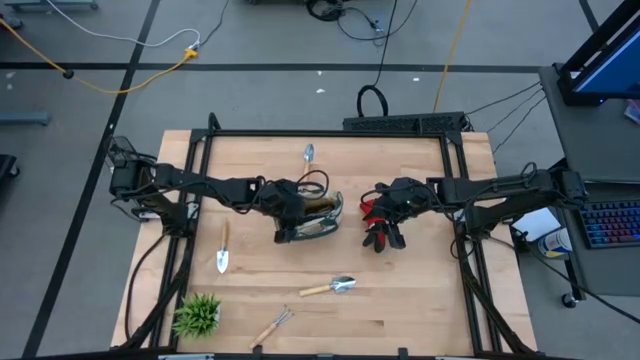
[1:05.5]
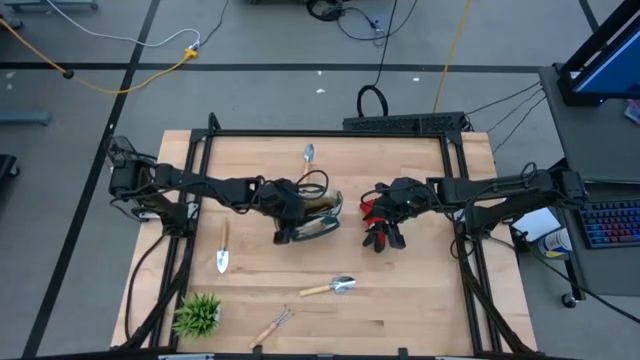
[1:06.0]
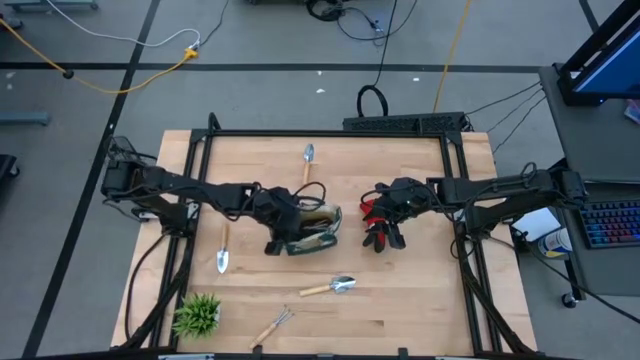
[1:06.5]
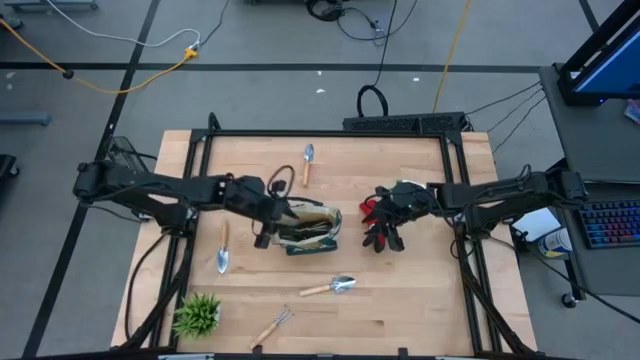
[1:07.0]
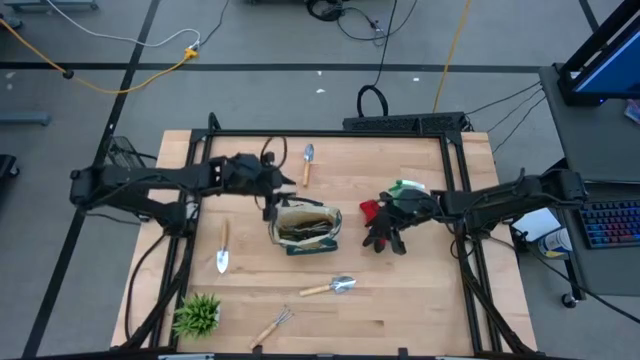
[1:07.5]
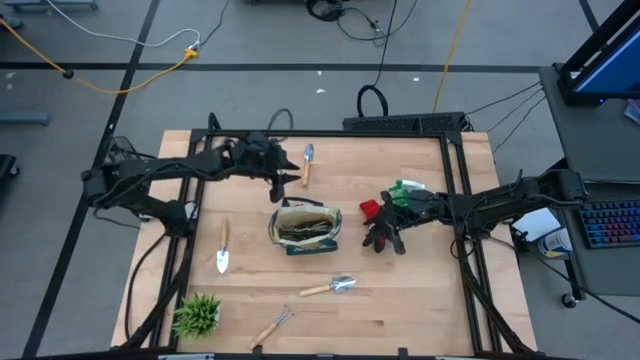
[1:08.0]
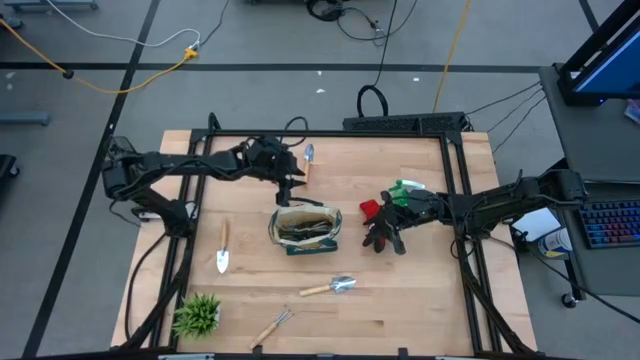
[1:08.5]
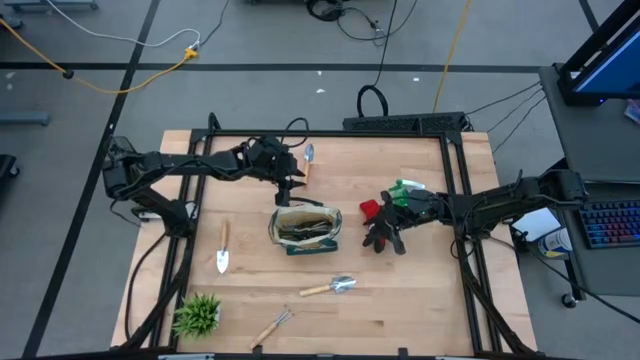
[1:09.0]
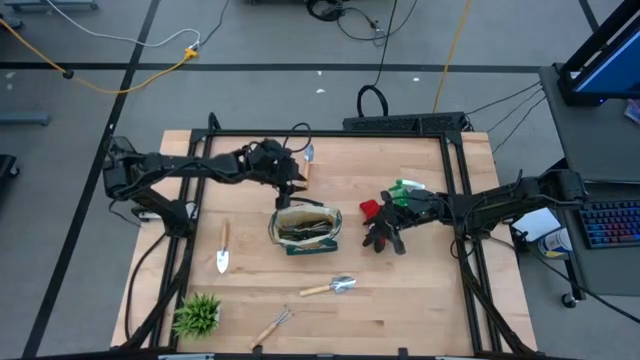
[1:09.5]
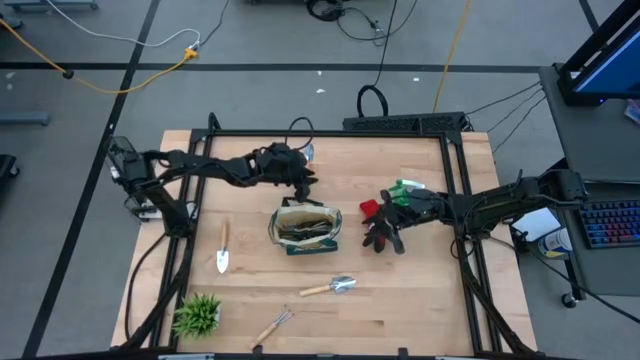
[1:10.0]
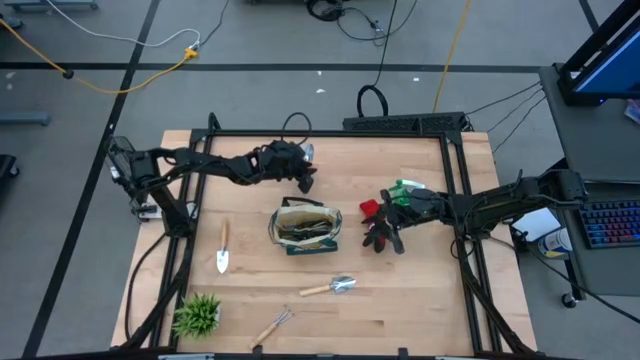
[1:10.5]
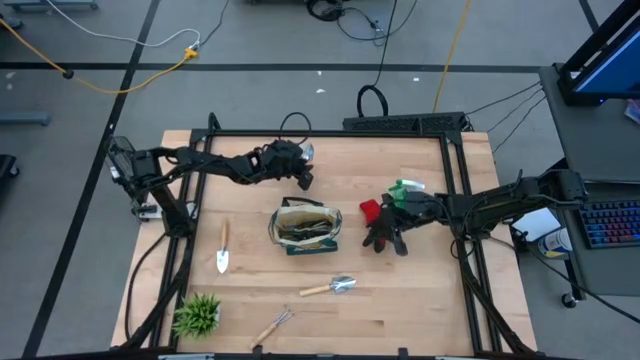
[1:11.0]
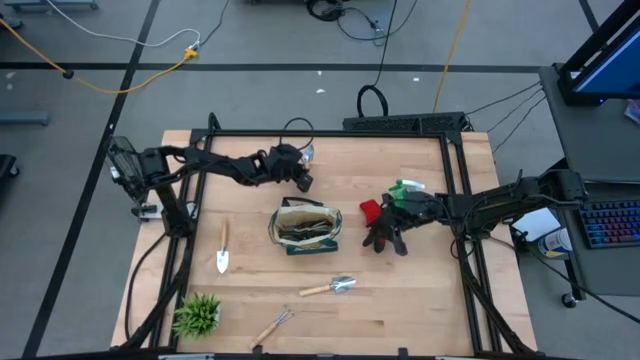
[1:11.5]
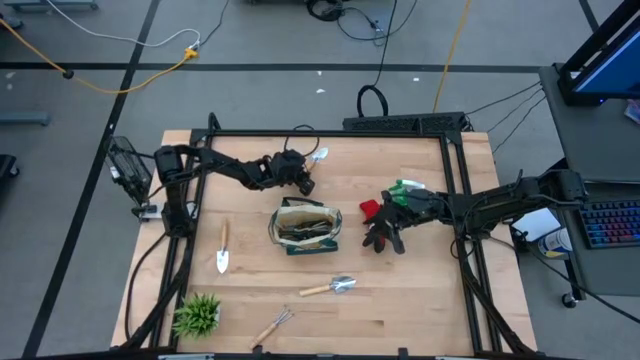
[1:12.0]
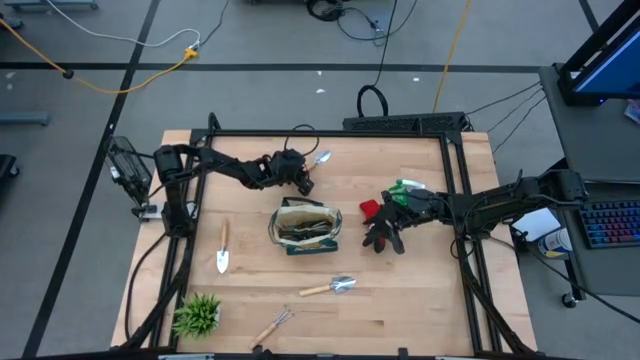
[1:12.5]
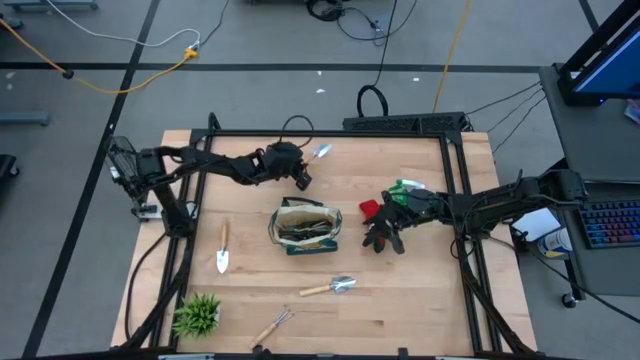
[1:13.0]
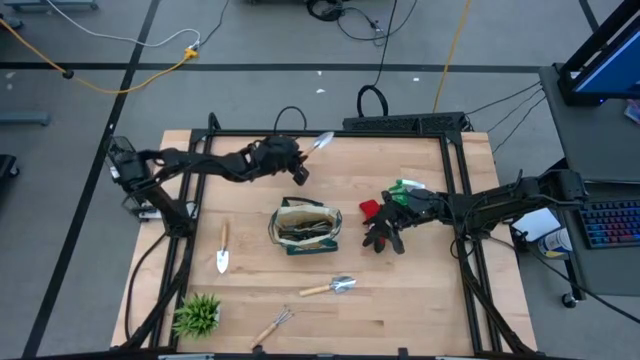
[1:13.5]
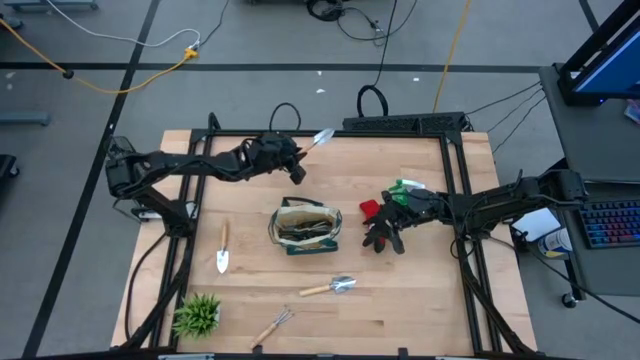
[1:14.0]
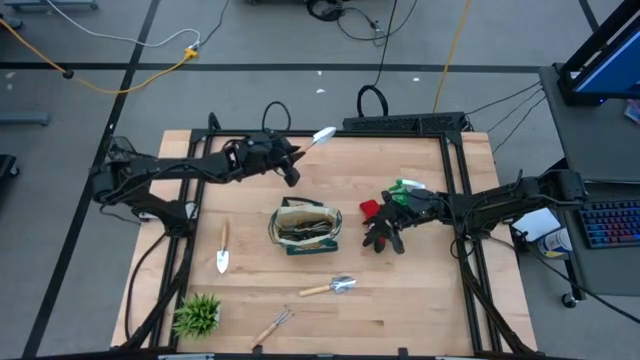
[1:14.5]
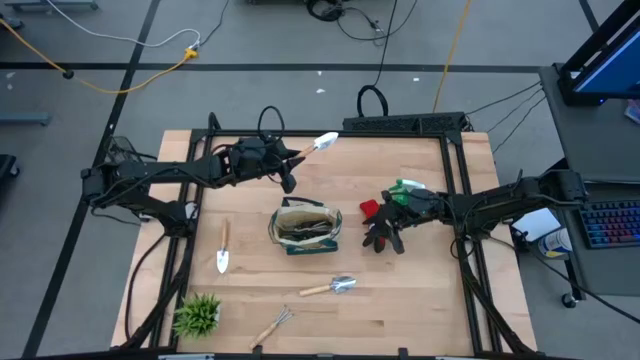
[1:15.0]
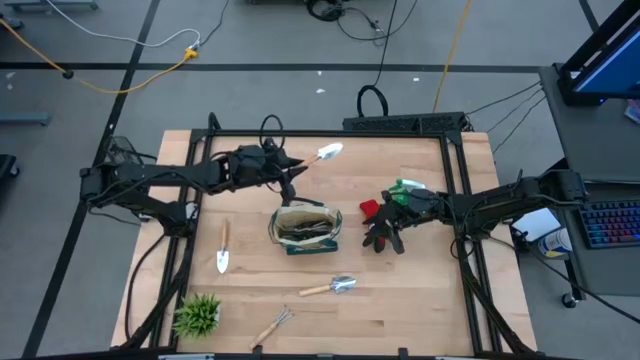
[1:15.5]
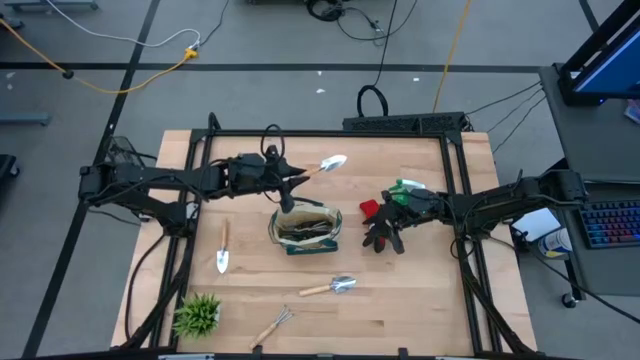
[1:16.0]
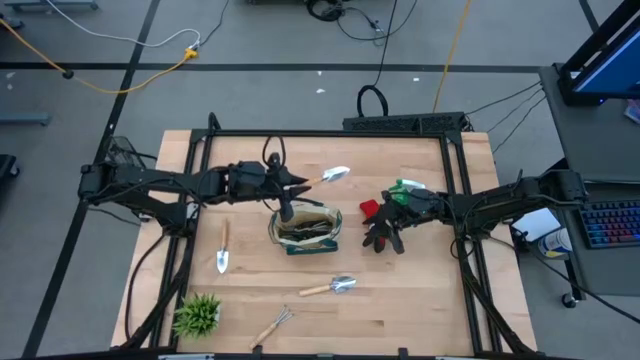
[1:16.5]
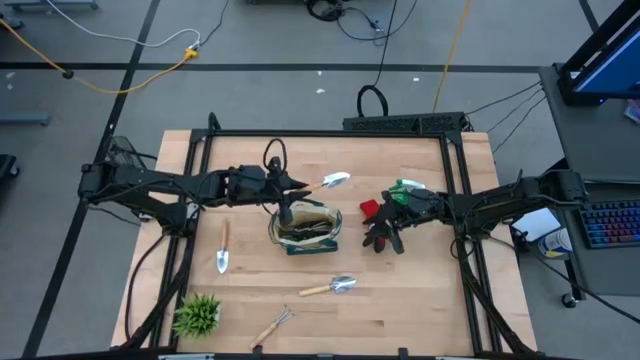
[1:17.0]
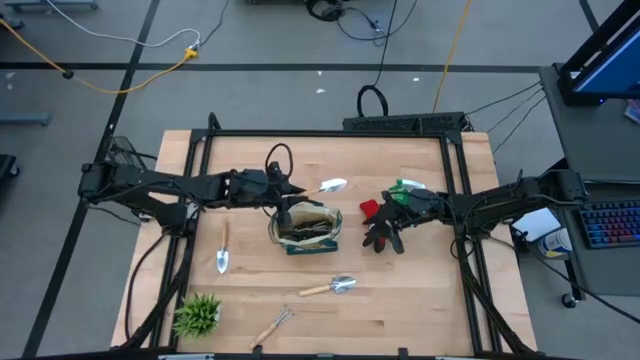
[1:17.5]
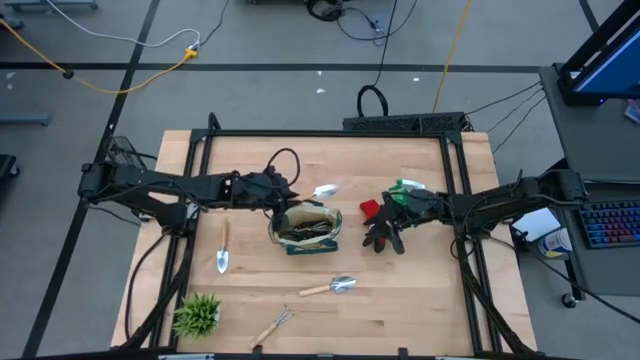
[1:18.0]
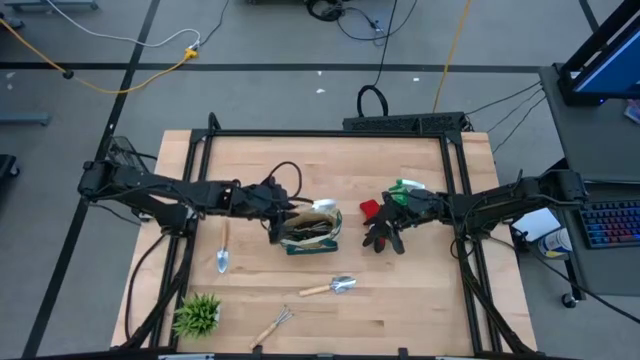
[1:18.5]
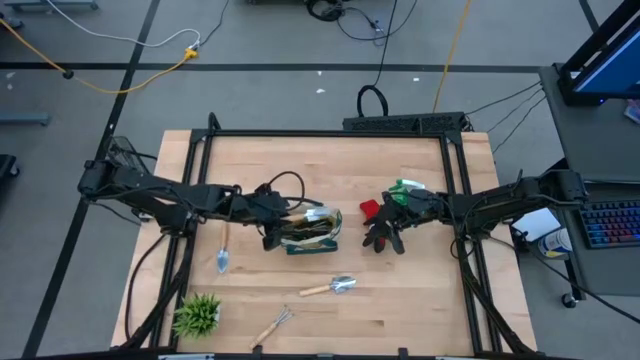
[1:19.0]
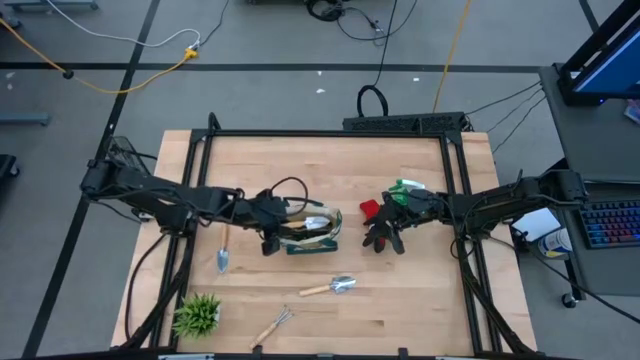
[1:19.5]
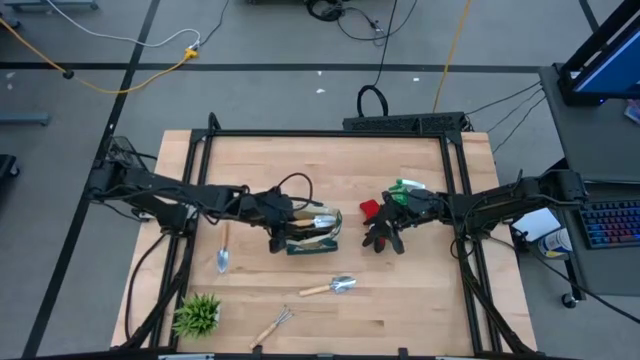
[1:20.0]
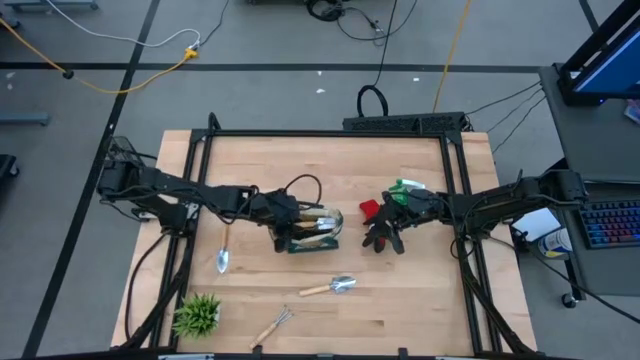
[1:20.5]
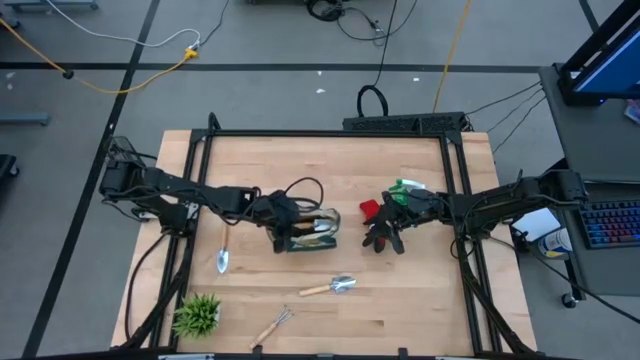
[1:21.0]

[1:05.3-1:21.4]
Task: Pick & Place Garden tools in Gardening bag
Put the top brown trowel into the green gardening bag

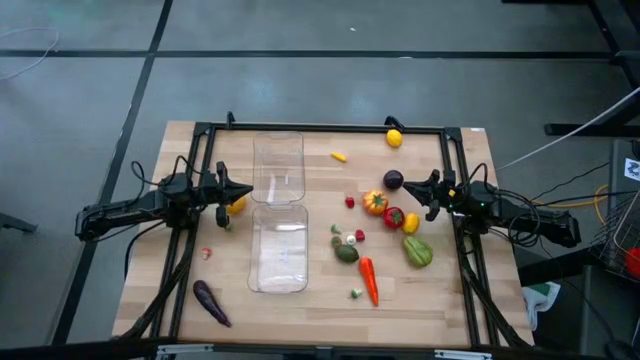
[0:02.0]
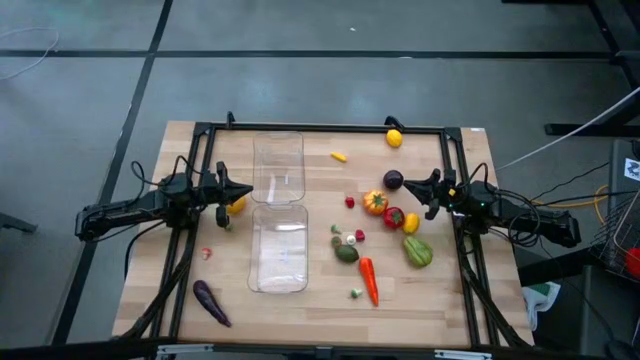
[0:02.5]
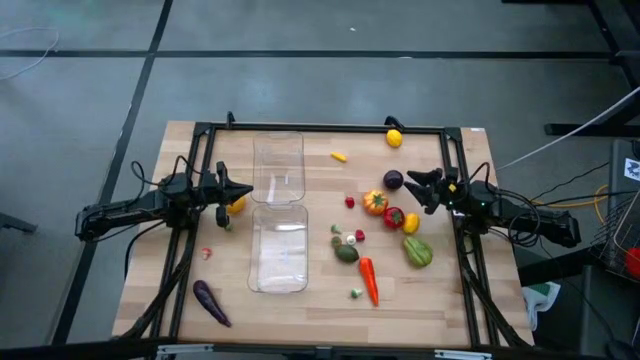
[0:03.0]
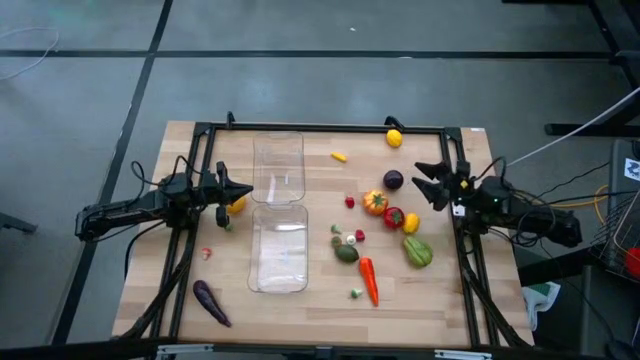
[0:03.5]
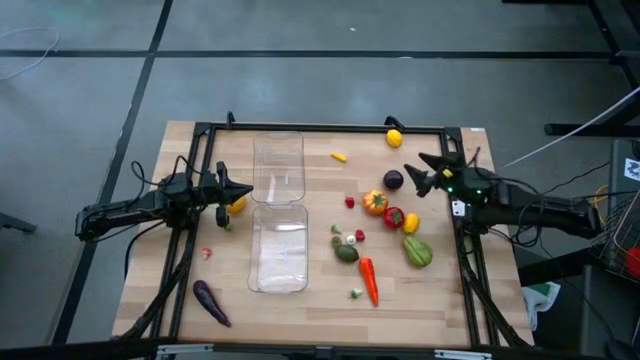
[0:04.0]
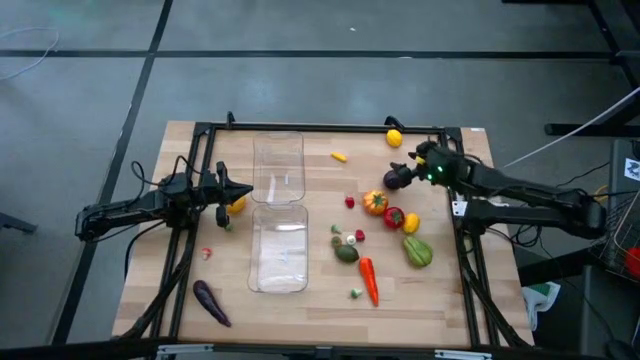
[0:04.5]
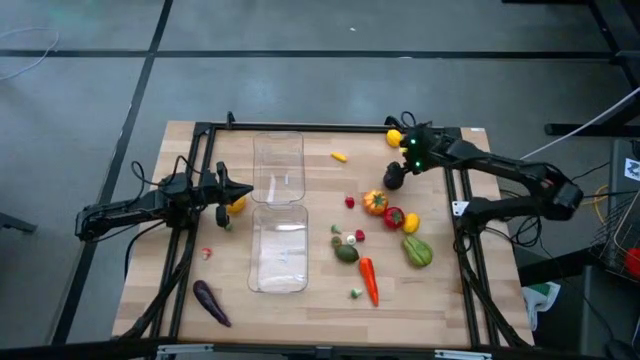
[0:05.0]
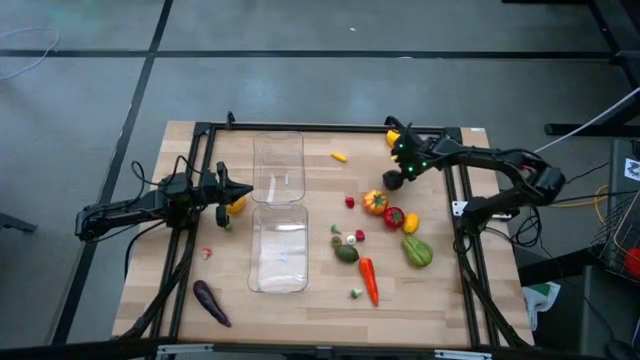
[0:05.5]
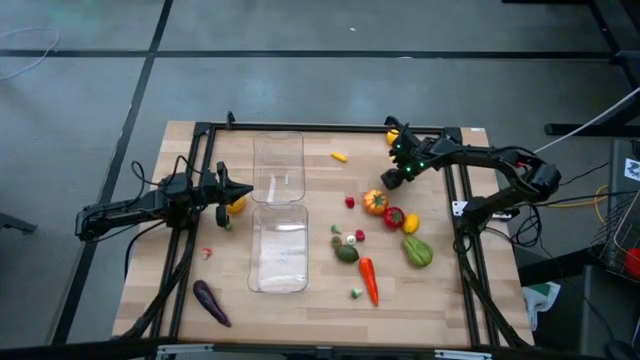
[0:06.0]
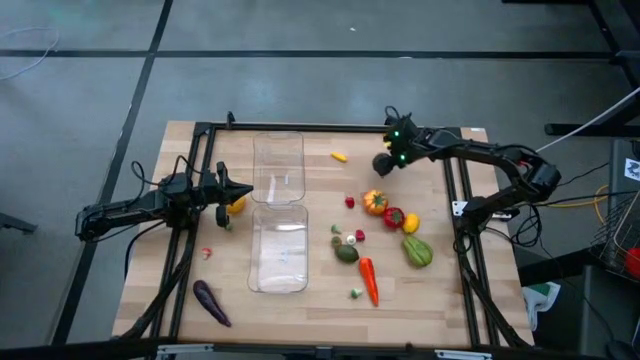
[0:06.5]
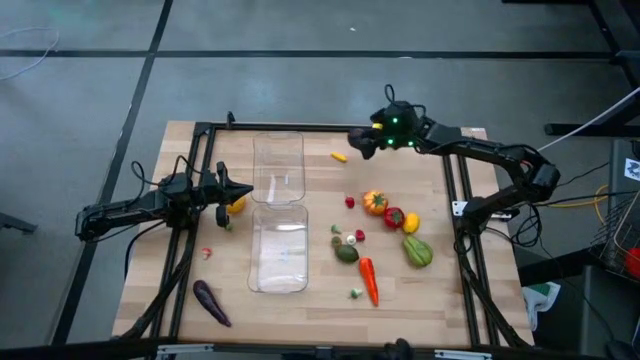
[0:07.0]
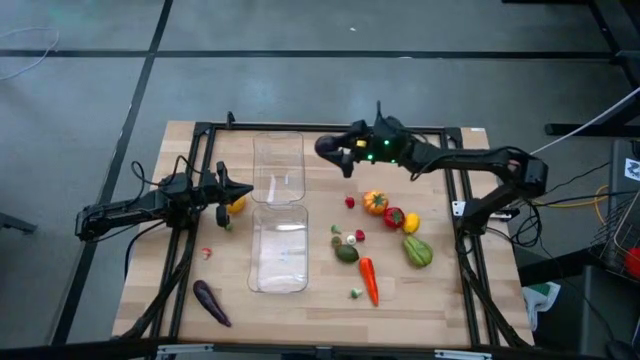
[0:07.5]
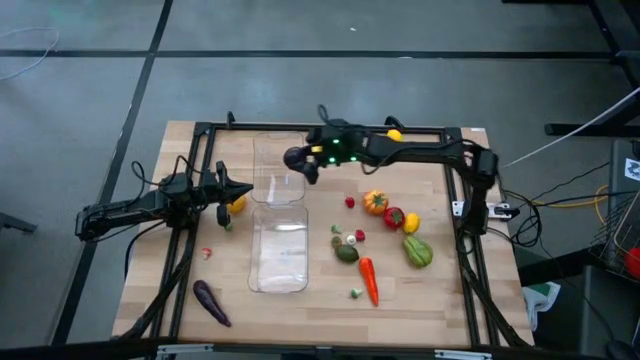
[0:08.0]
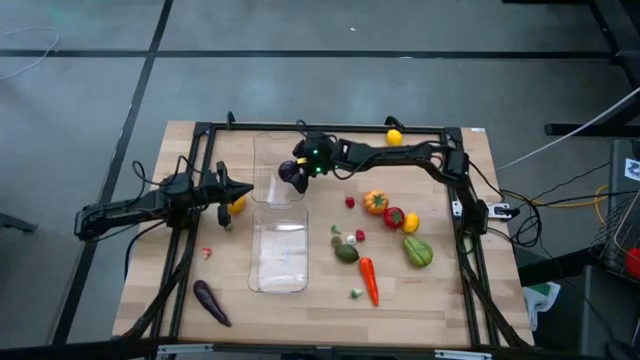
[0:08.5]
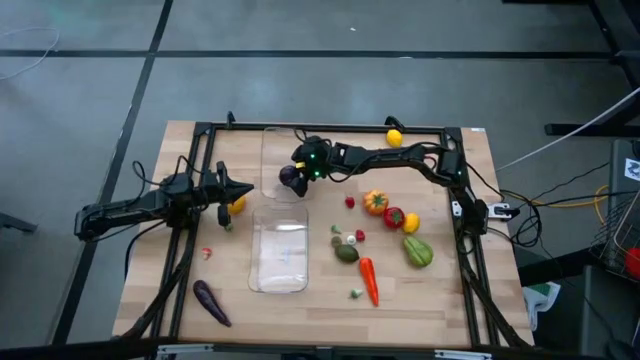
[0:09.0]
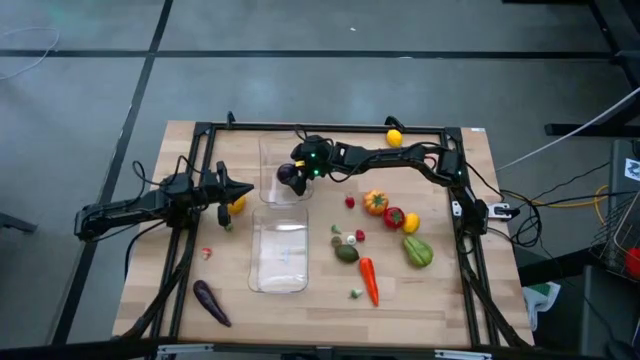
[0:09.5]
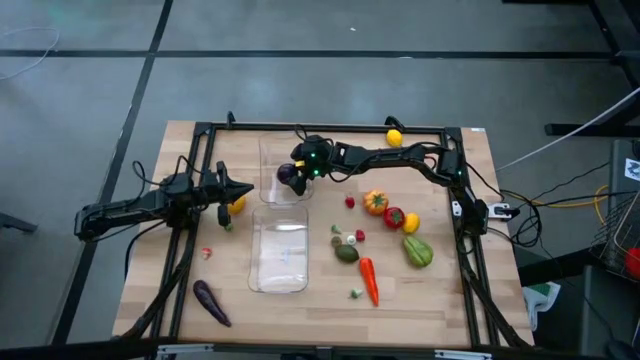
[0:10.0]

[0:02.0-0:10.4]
Task: Sort produce into baskets
Put the black plum into the top transparent bin
